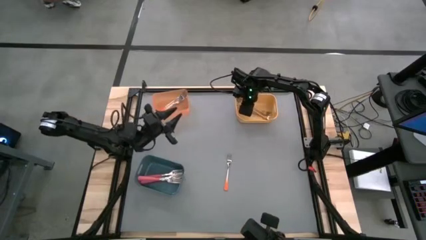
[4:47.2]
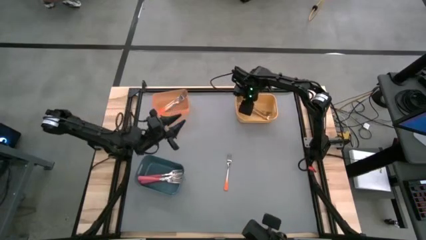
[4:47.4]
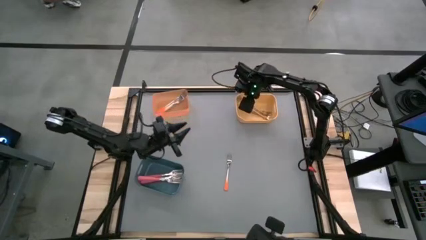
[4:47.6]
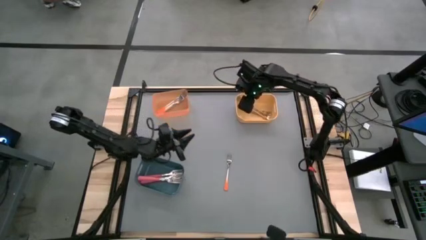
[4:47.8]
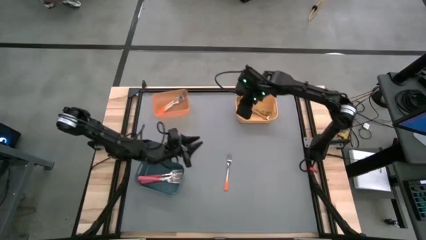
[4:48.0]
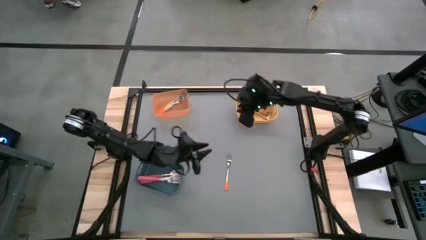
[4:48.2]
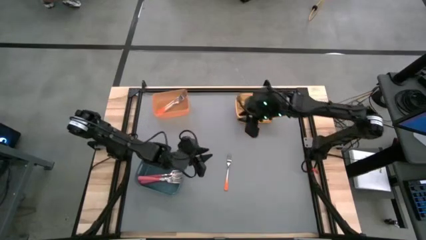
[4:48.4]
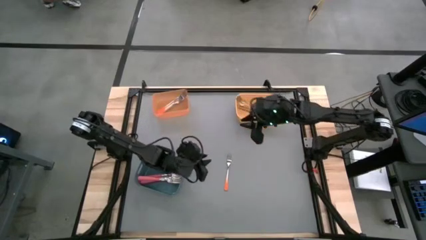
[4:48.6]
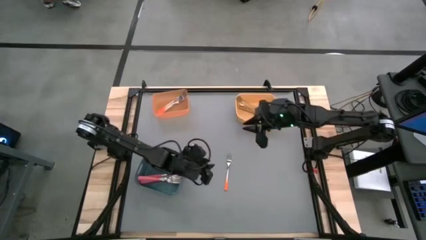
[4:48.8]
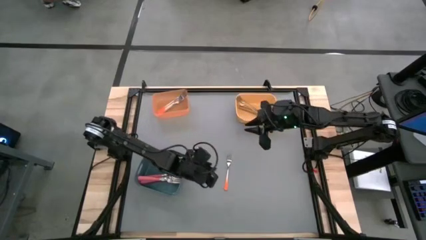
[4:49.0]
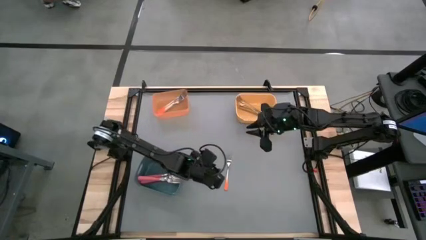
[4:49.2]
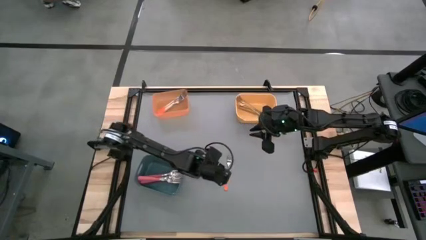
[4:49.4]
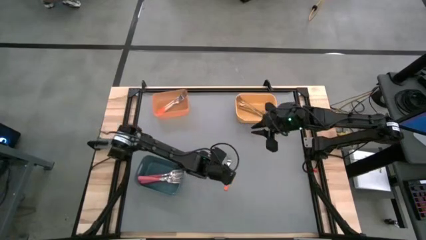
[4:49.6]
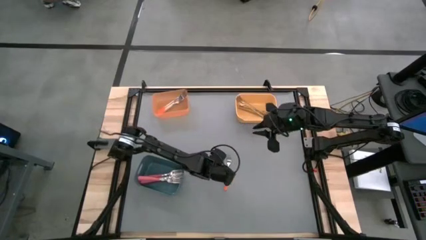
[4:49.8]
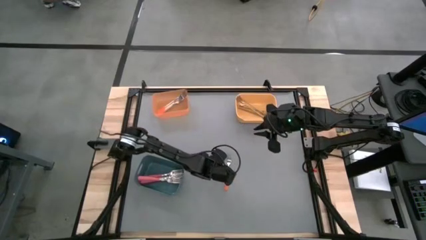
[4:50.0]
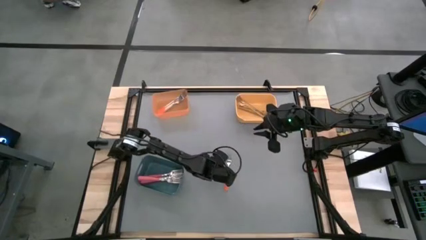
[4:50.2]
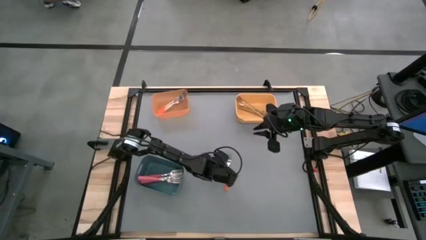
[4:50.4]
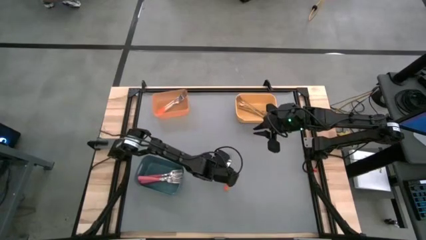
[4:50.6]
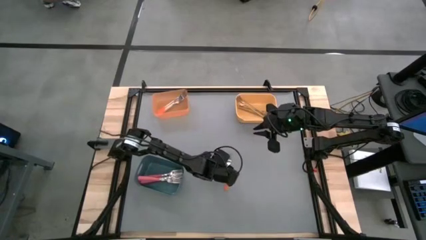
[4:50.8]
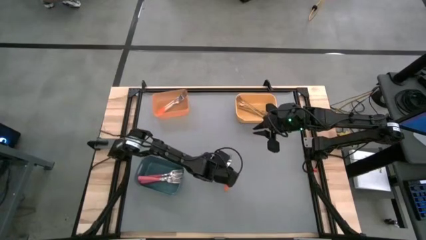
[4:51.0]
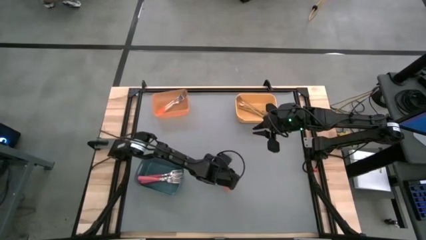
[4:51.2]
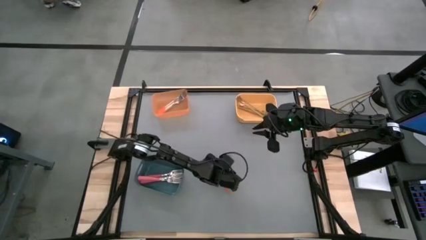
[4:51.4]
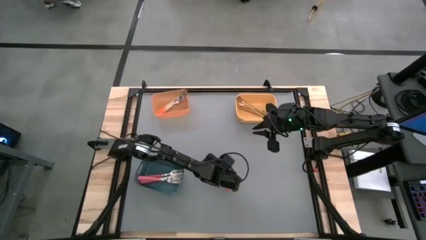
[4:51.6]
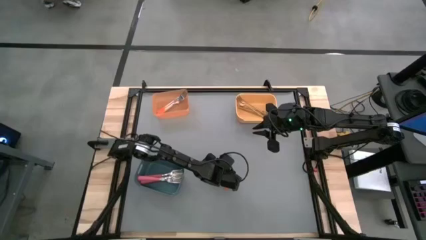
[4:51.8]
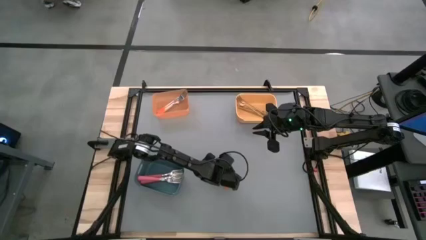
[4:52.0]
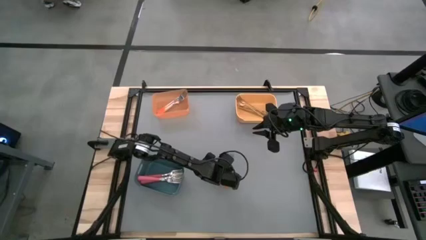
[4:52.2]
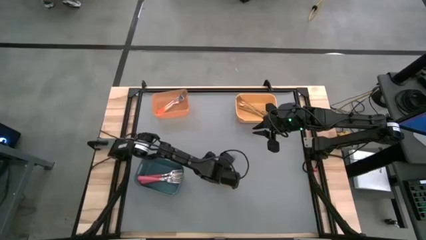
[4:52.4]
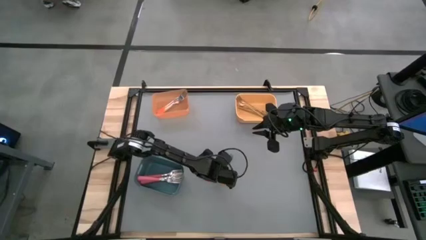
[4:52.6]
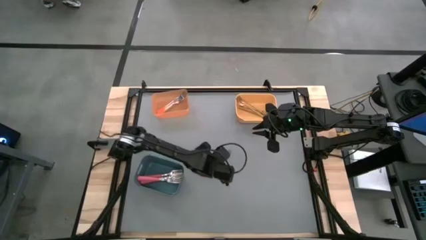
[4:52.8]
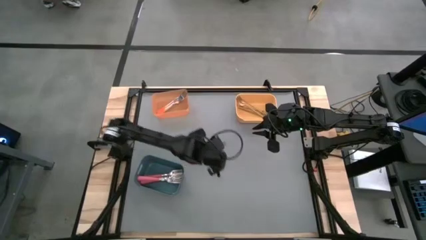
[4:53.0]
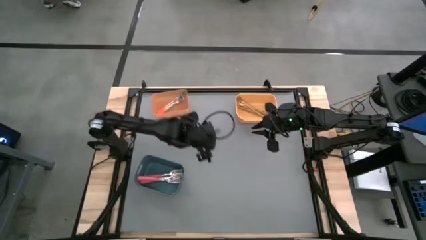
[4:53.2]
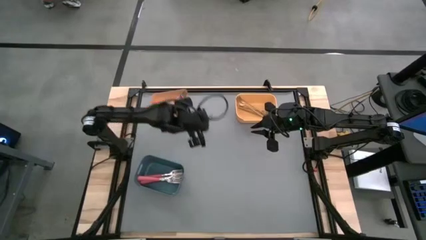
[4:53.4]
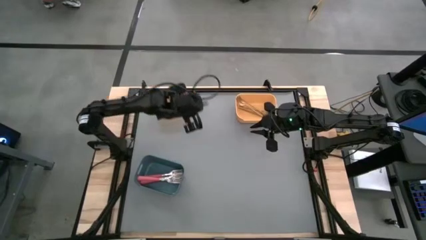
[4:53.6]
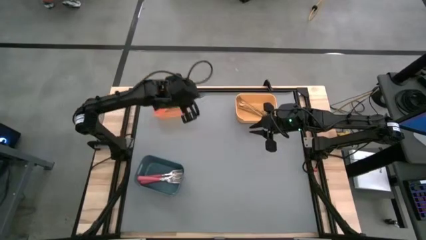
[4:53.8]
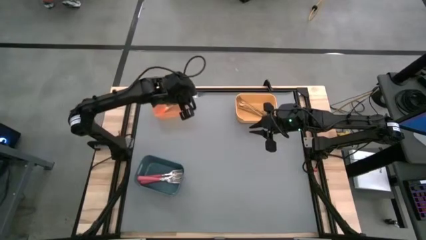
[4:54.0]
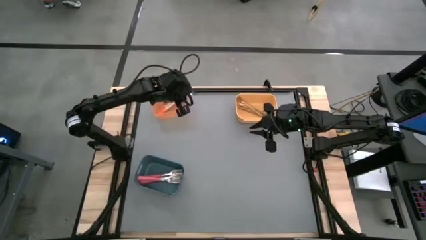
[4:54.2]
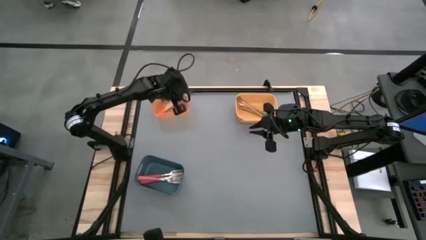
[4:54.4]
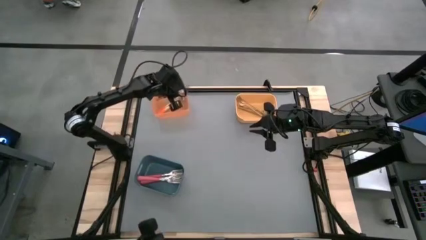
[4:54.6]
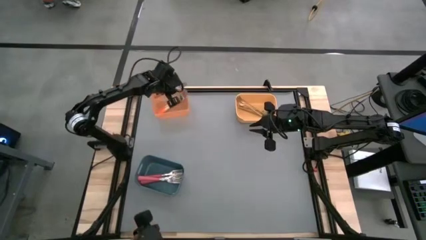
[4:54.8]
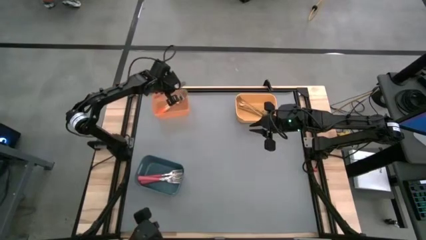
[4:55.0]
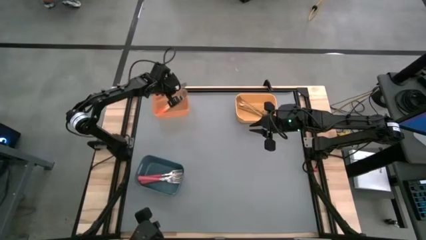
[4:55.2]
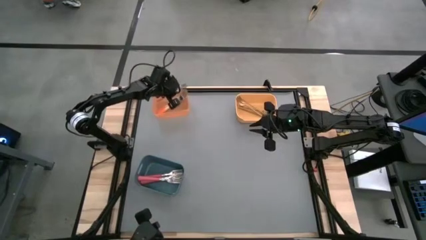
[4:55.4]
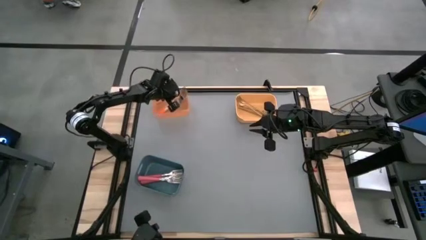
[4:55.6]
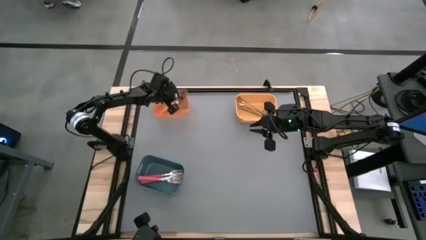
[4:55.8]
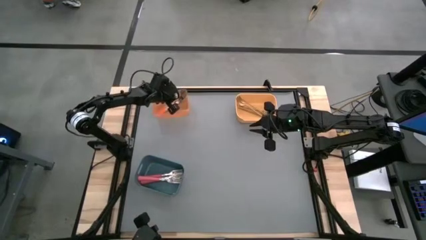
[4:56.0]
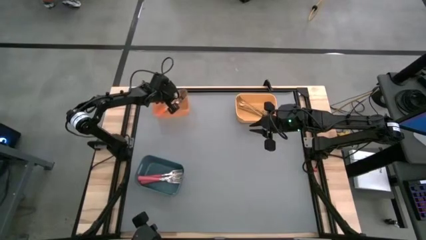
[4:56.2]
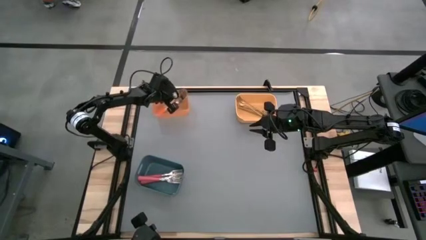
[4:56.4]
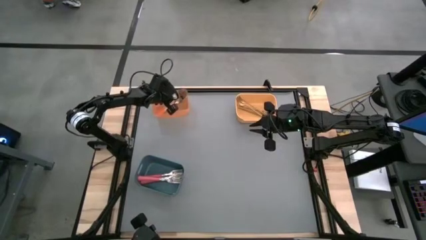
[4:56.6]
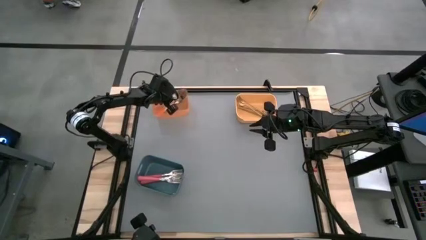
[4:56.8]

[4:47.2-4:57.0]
Task: Sort silverware by color (type)
Put the orange fork into the orange bin

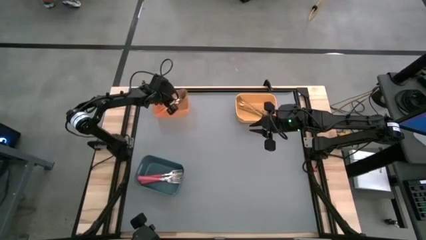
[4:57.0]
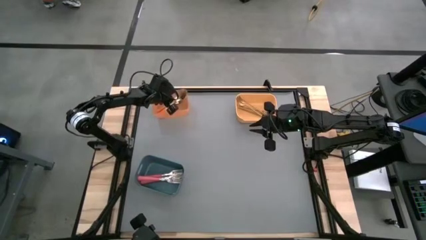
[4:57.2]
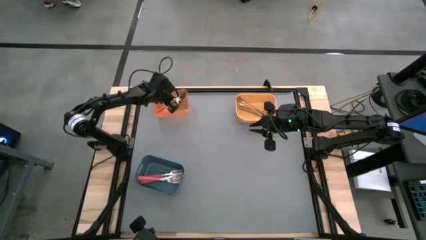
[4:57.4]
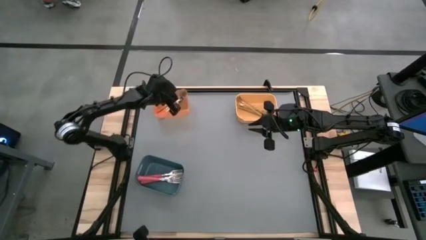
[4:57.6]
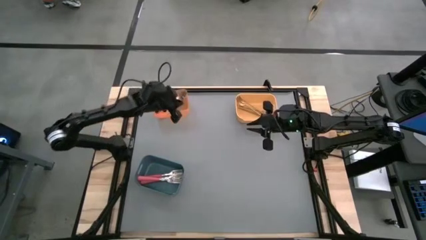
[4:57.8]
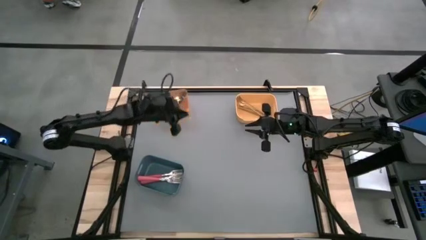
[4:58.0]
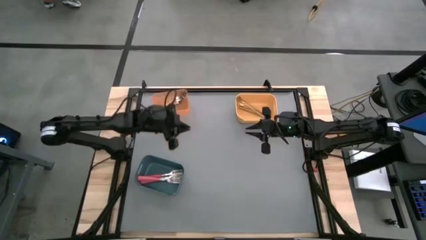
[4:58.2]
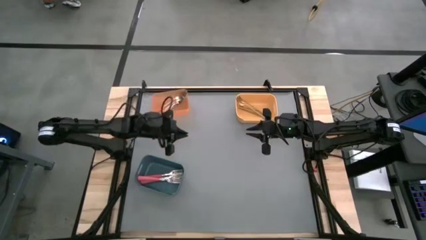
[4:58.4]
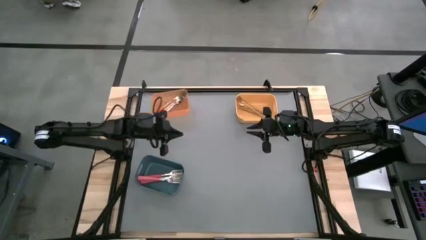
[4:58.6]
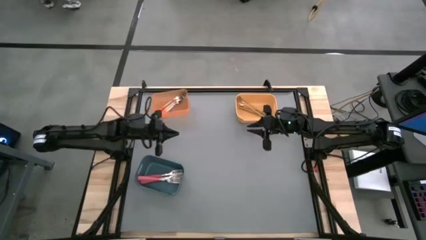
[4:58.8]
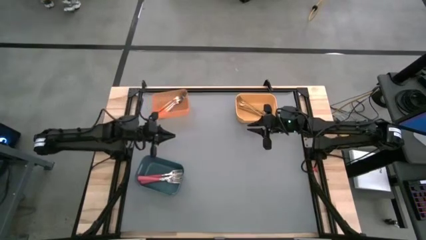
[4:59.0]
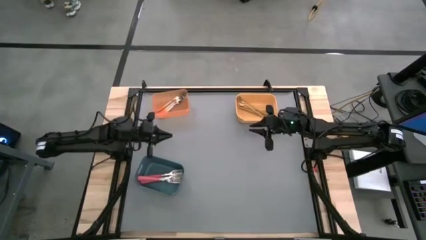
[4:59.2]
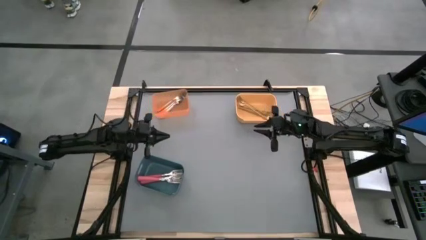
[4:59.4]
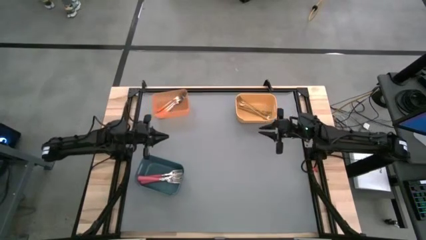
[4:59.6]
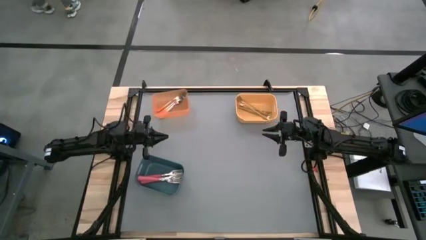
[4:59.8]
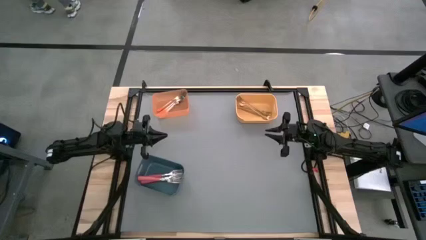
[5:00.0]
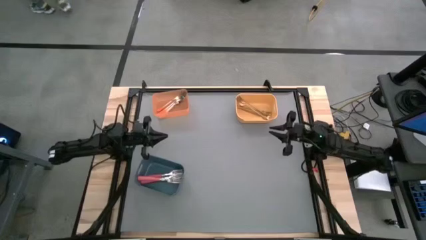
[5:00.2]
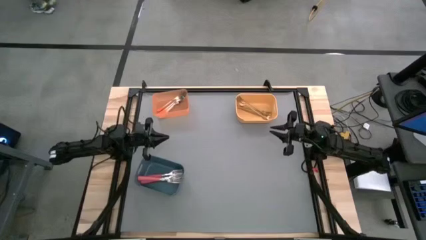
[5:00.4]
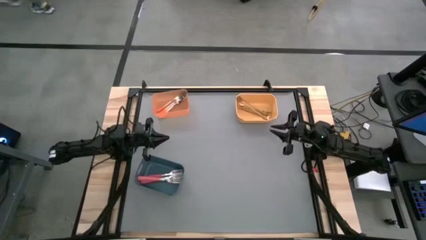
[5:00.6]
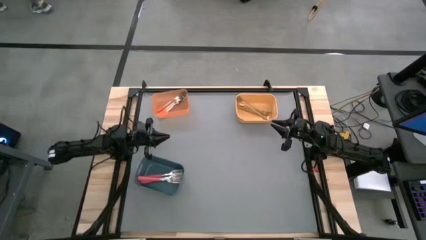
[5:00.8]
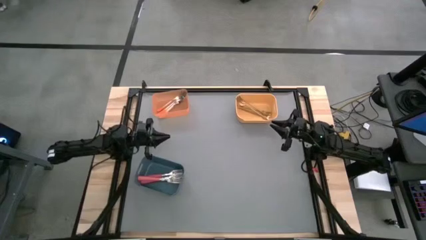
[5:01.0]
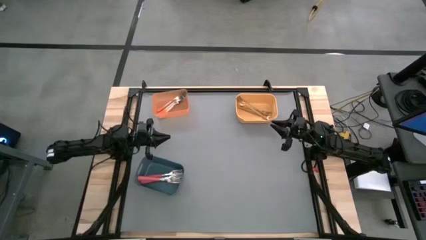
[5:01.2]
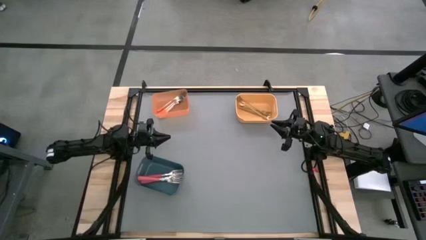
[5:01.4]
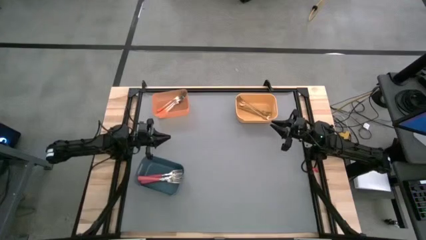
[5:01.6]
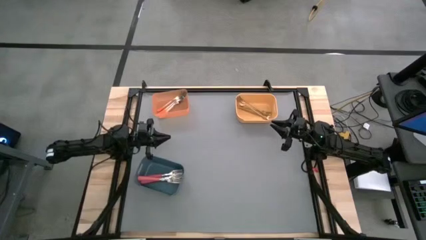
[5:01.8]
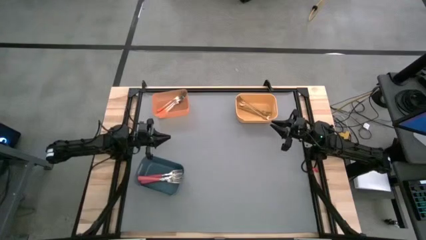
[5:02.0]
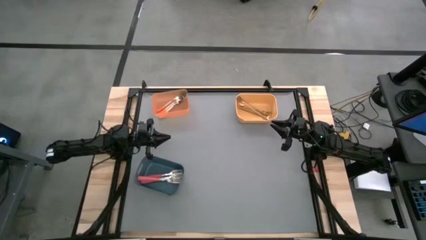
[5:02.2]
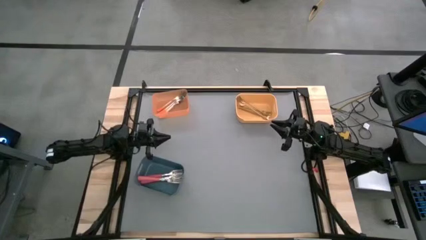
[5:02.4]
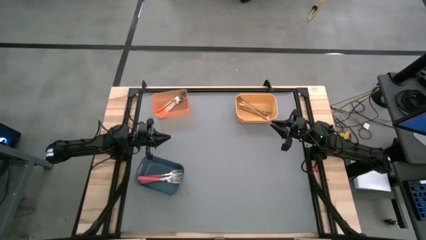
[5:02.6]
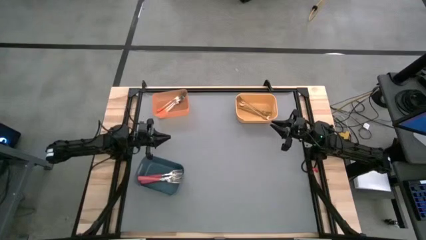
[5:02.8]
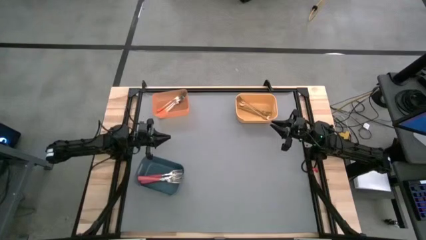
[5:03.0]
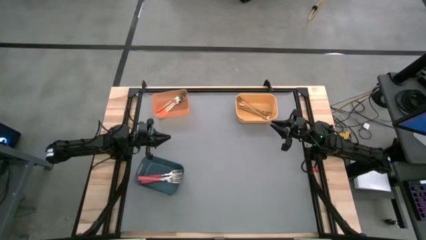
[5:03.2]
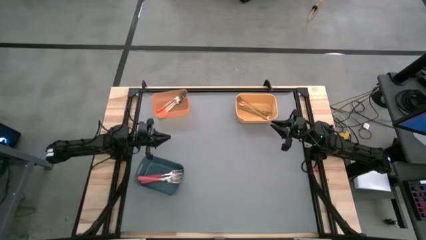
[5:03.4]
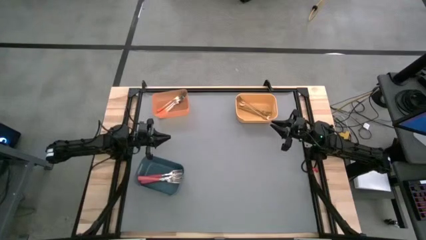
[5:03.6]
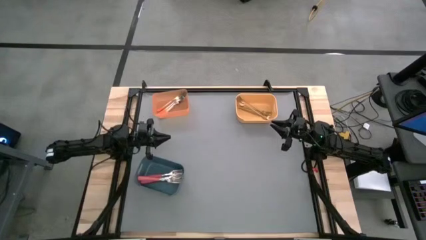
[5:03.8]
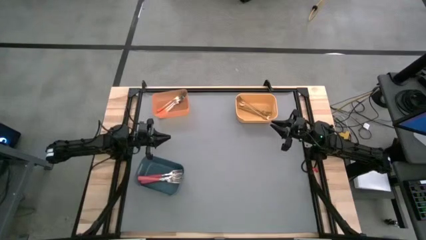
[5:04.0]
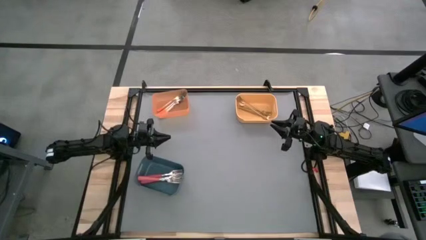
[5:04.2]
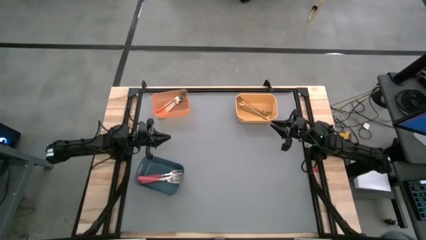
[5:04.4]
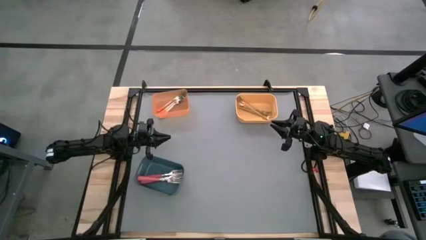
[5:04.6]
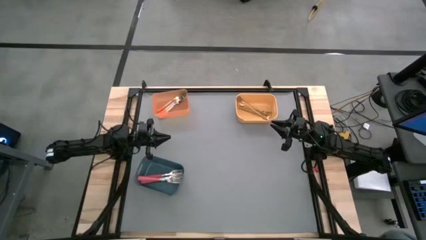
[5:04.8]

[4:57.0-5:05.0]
Return to Home Position
